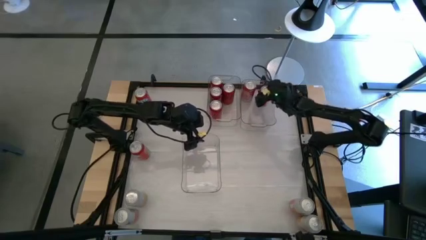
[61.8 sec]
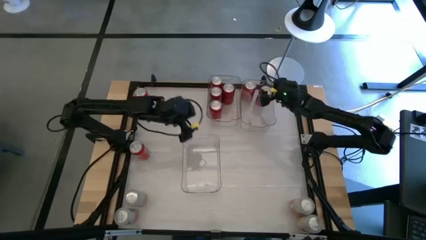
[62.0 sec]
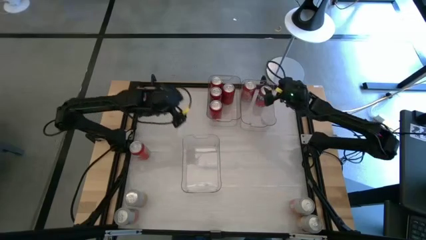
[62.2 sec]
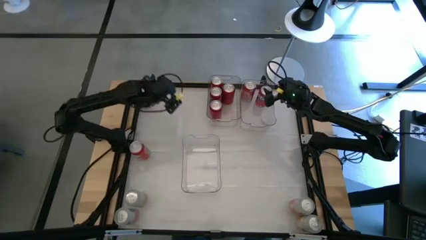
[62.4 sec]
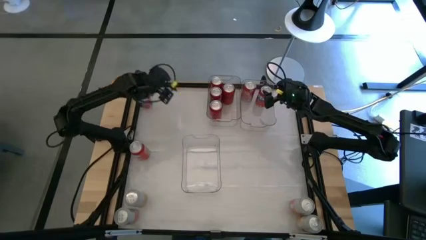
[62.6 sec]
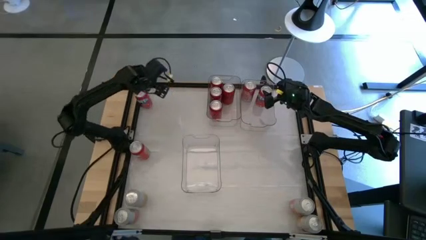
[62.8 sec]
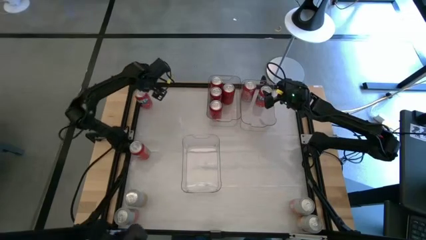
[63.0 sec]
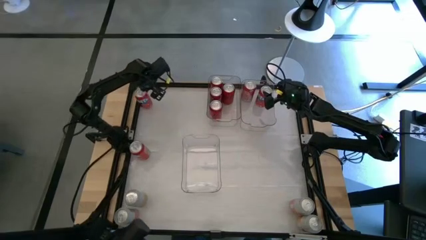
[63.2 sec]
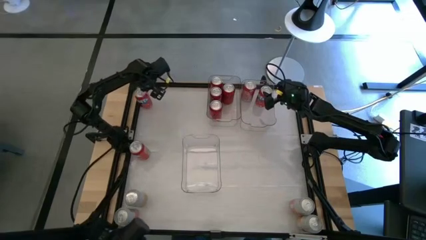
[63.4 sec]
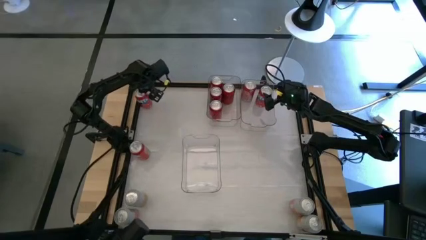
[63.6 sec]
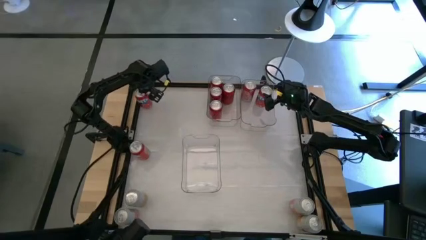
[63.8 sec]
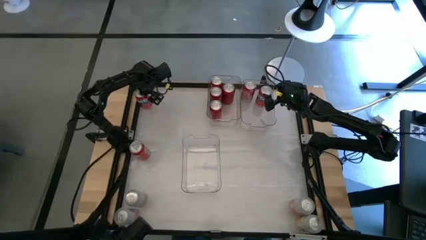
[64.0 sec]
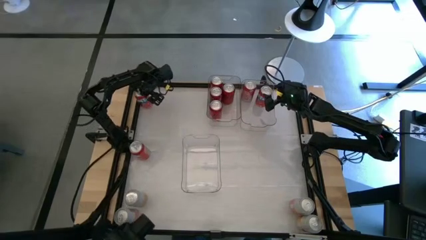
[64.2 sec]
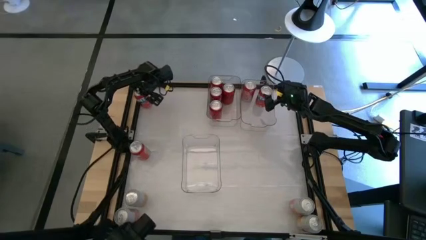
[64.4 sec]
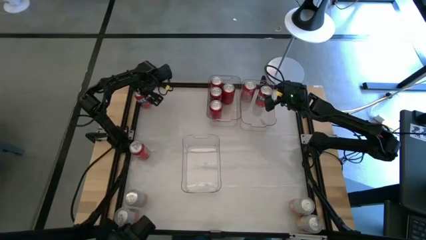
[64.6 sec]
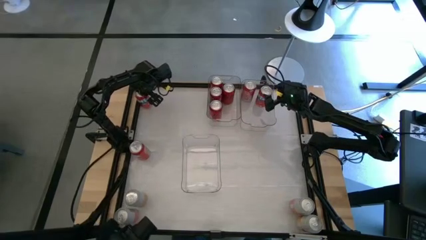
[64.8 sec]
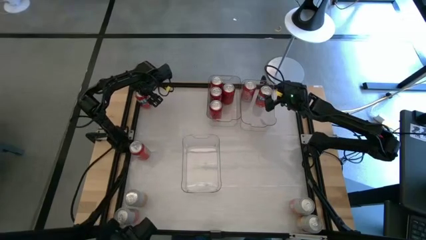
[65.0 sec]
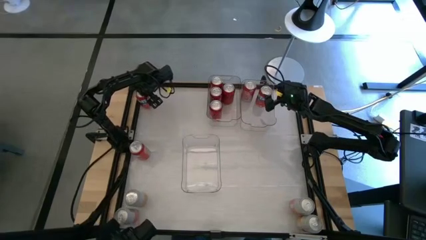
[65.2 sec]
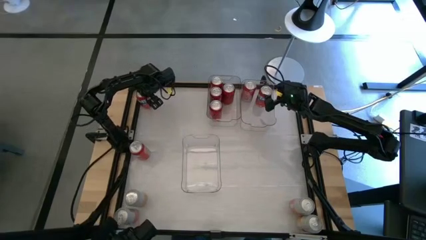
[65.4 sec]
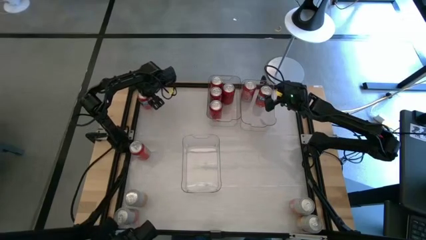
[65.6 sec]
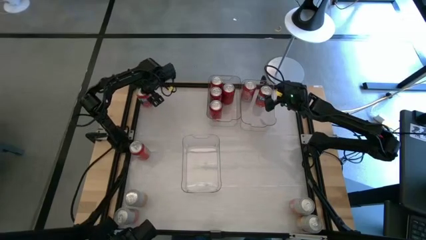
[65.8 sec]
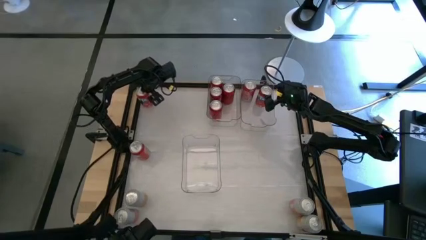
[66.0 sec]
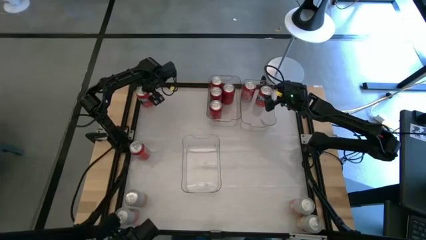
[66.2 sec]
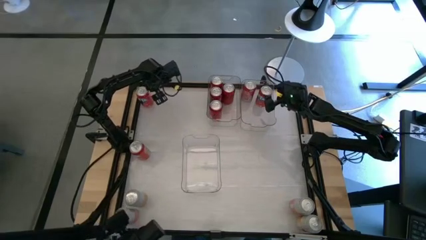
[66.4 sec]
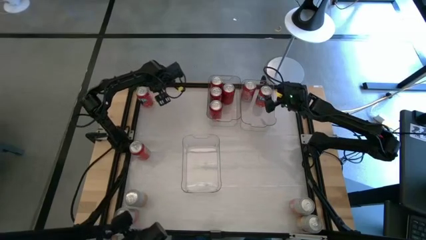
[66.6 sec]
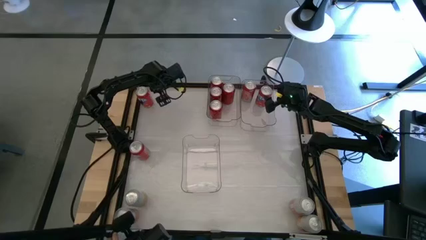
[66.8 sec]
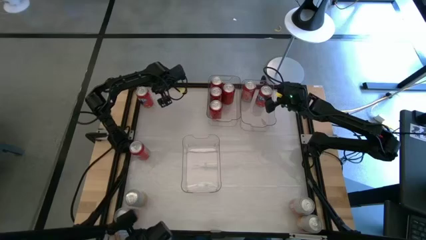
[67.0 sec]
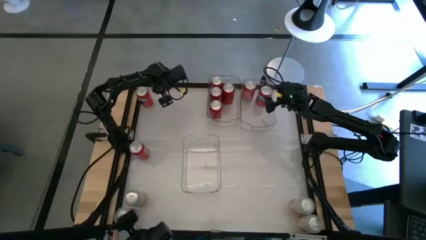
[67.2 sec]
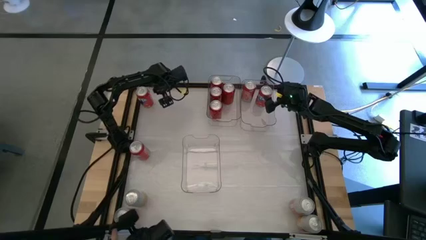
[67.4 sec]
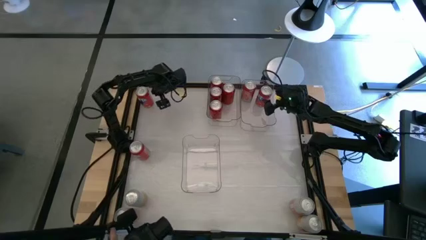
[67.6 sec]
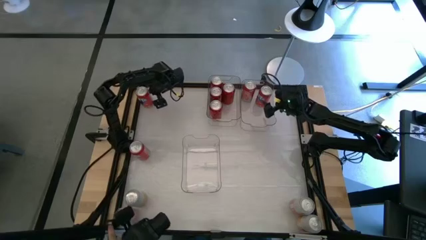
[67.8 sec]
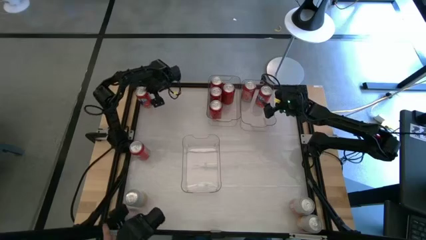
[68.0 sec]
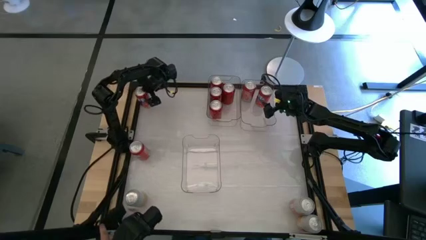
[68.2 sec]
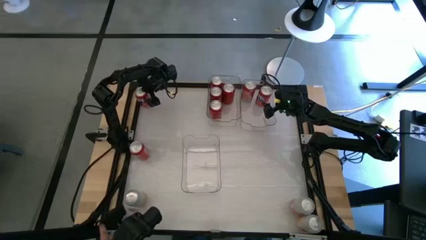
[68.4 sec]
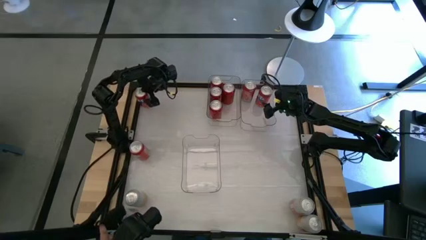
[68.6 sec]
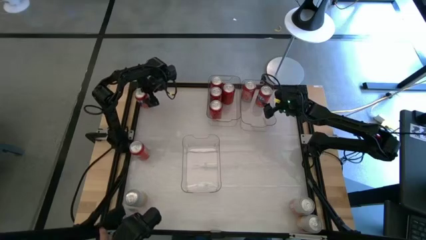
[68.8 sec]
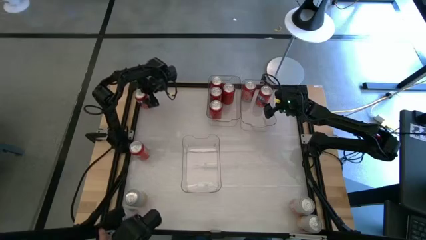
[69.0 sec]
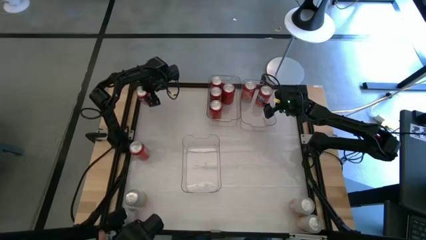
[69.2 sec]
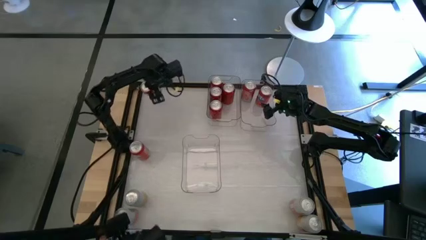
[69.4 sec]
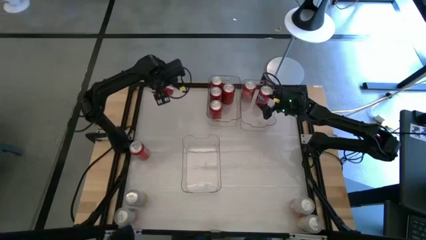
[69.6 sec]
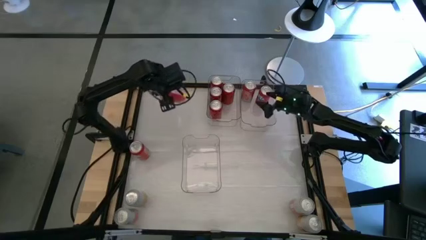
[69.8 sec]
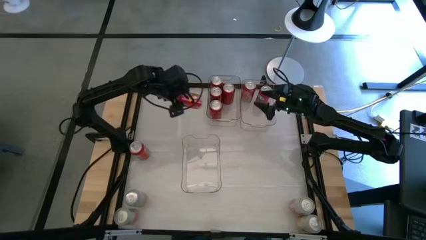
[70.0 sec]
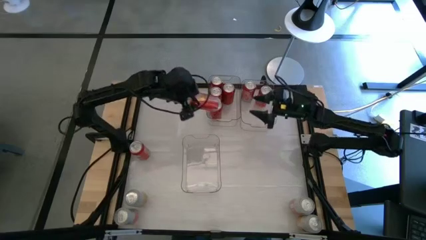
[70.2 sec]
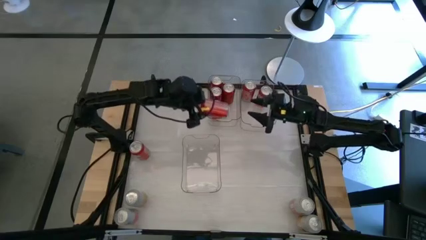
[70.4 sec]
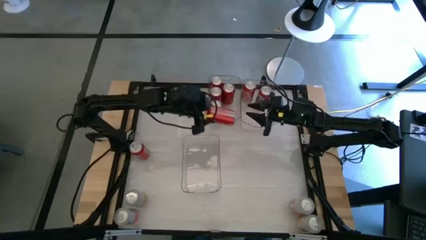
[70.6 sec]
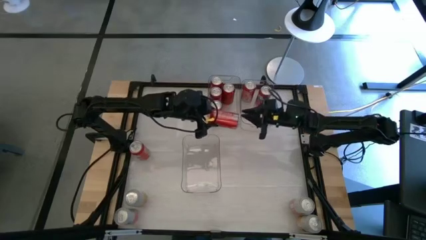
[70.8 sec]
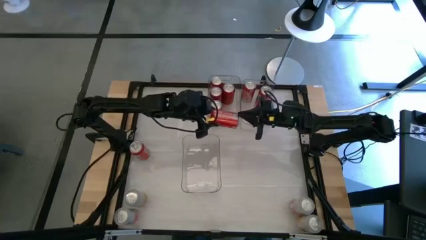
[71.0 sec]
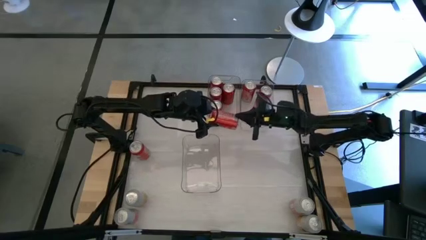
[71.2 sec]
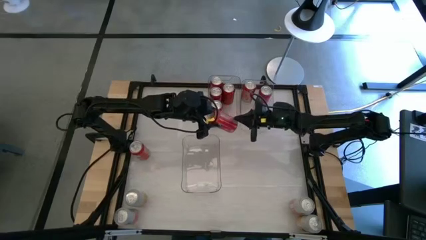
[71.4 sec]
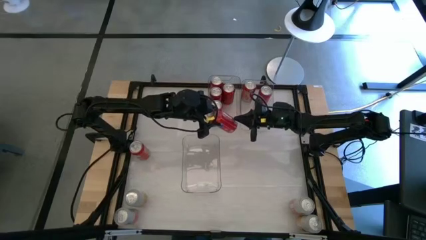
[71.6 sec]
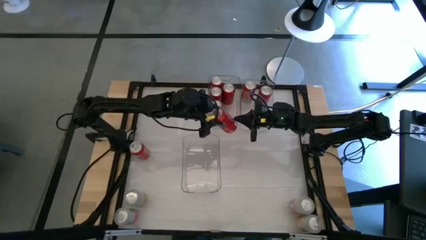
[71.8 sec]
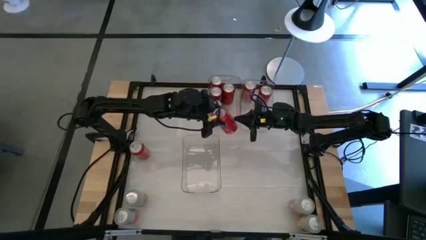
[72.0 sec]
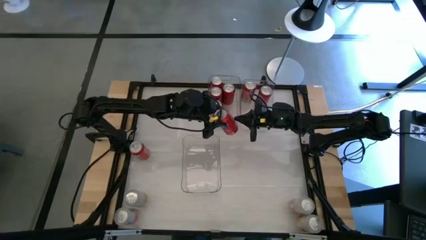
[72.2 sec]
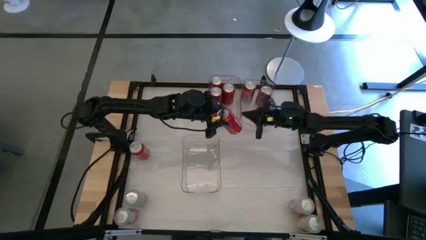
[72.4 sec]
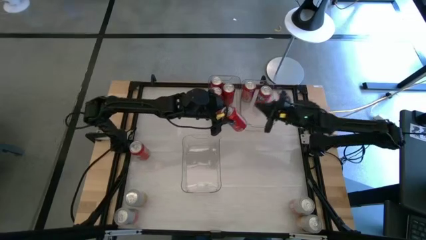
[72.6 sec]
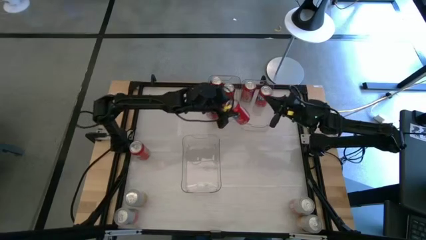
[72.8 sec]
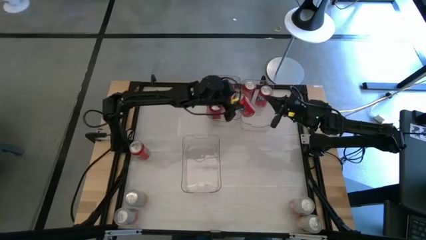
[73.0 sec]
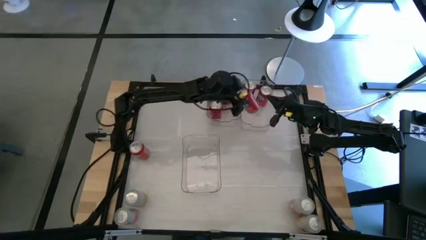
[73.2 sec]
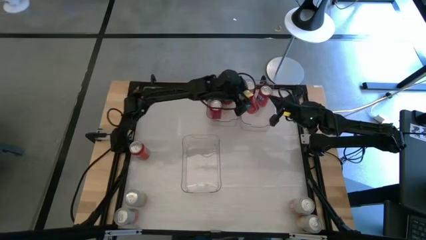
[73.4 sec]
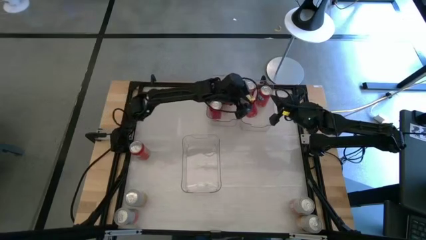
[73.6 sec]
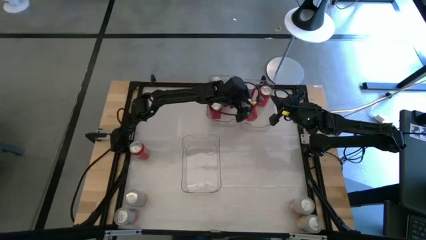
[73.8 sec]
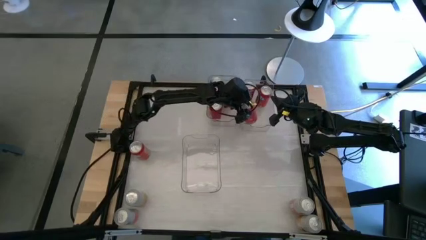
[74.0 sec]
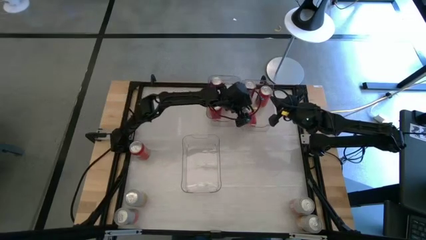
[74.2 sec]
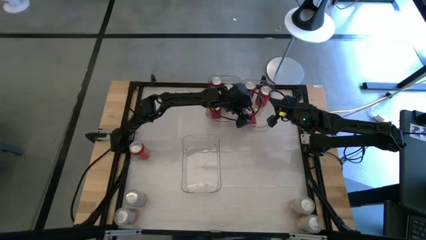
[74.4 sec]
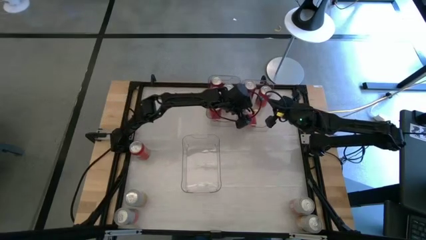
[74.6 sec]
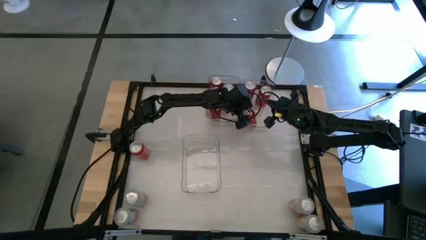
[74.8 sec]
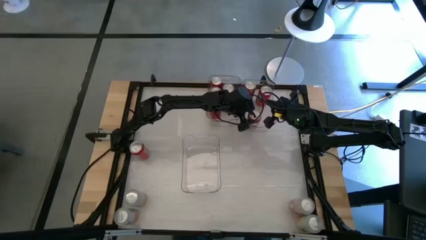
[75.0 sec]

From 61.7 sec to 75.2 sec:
Task: Sort soda cans
Put the top red soda can into the top right transparent bin
